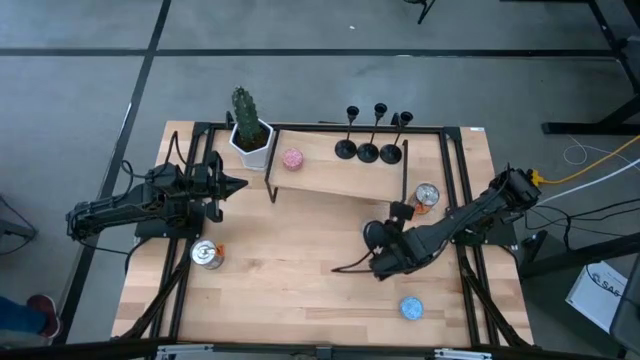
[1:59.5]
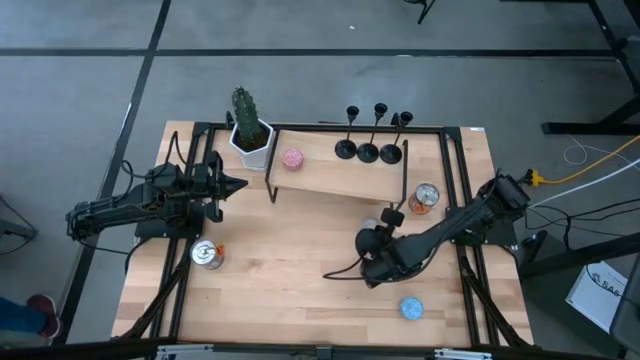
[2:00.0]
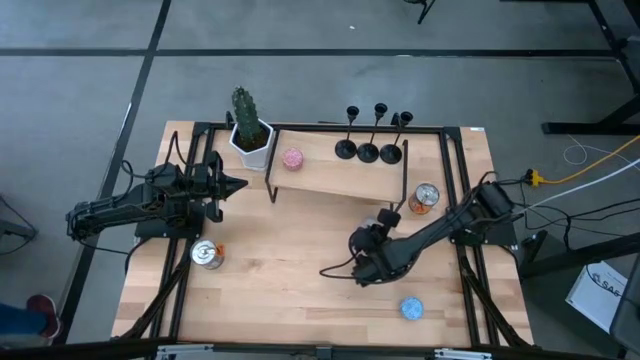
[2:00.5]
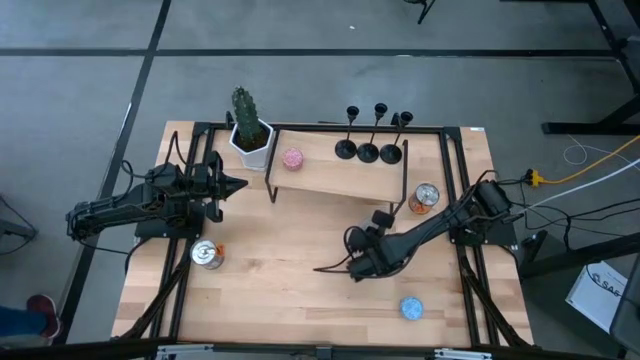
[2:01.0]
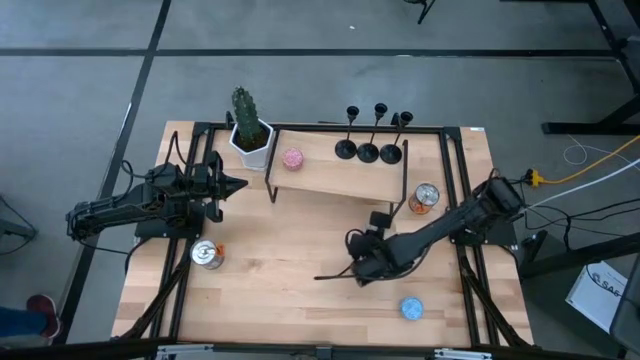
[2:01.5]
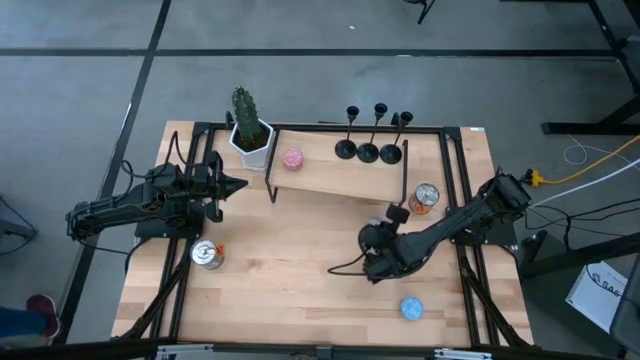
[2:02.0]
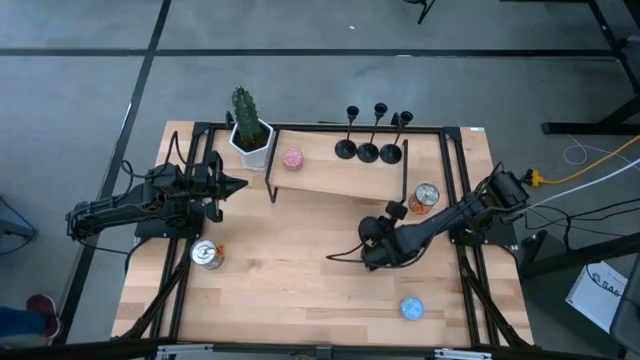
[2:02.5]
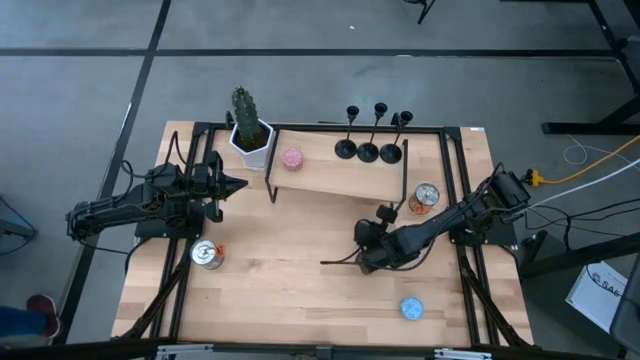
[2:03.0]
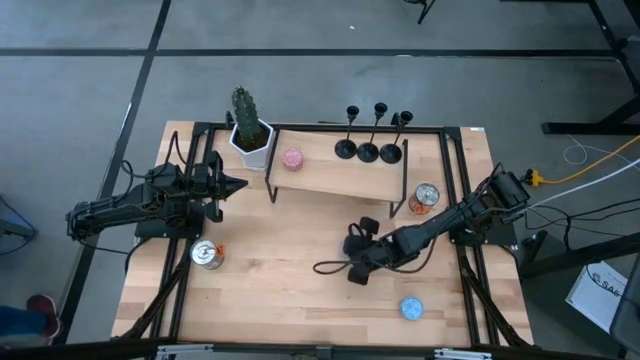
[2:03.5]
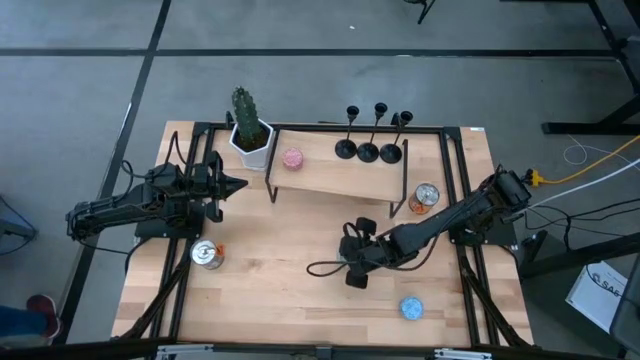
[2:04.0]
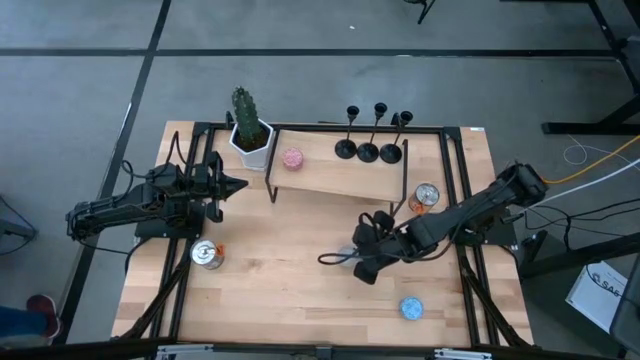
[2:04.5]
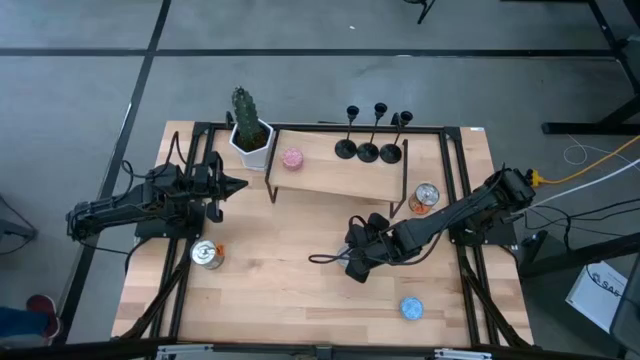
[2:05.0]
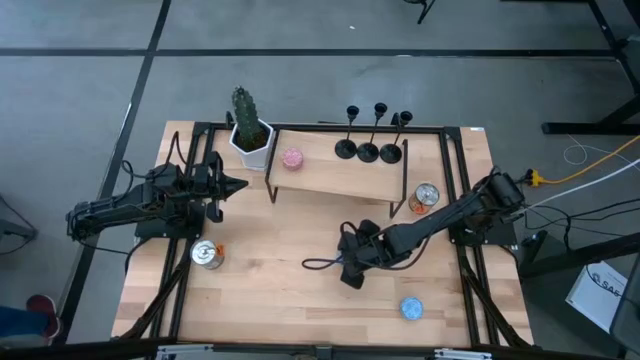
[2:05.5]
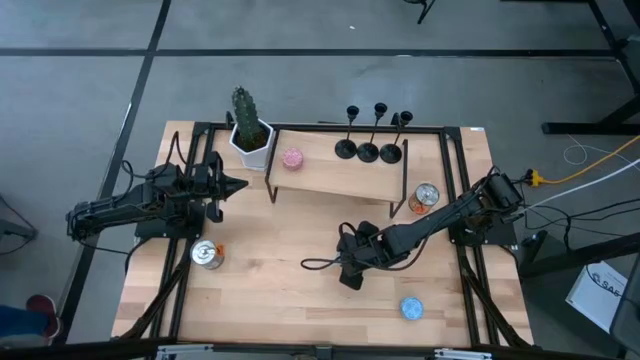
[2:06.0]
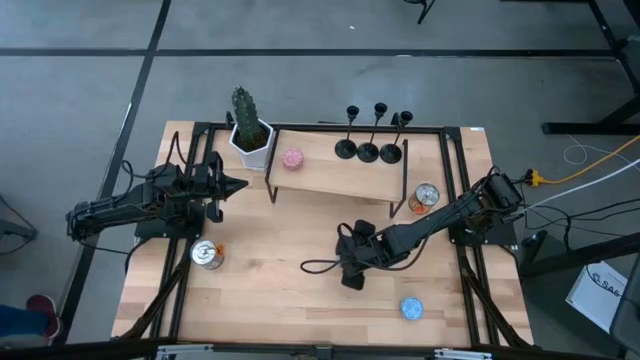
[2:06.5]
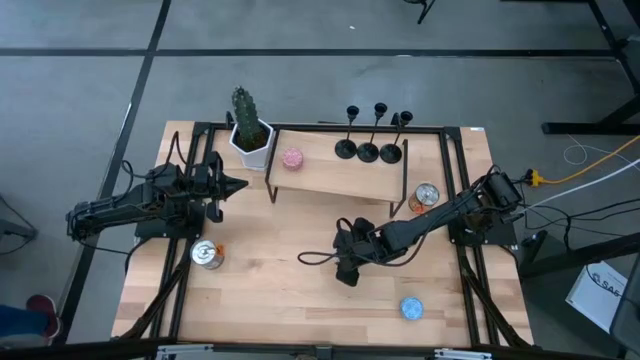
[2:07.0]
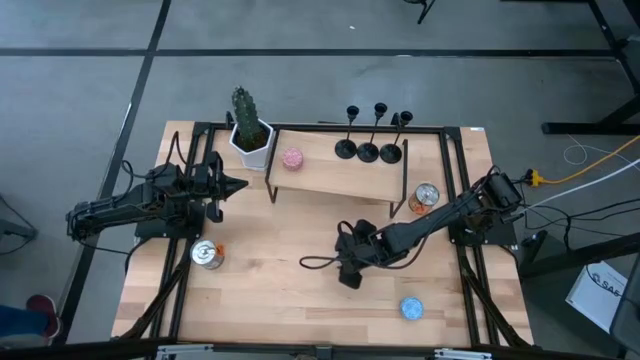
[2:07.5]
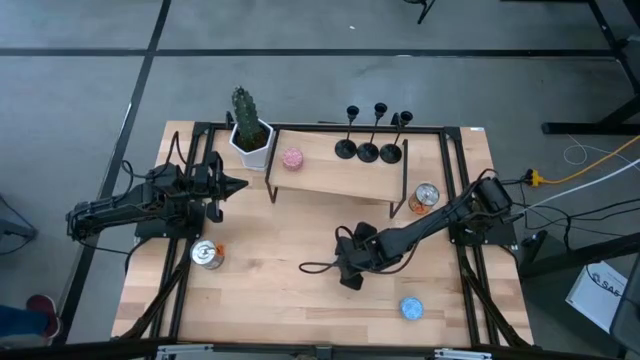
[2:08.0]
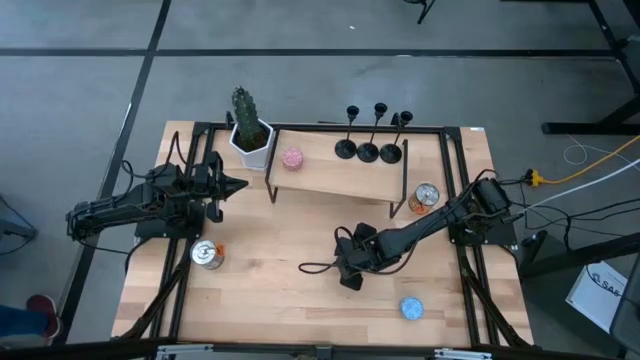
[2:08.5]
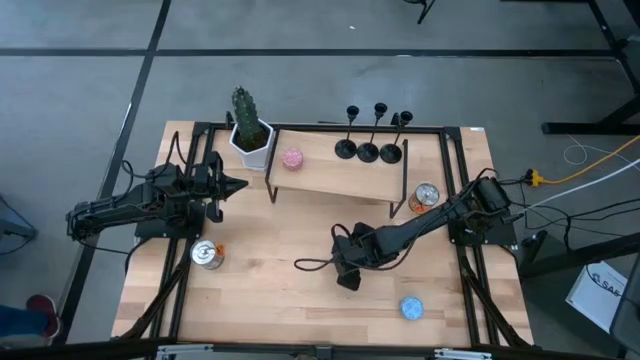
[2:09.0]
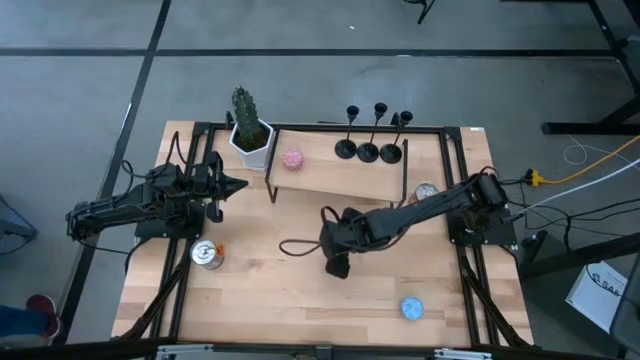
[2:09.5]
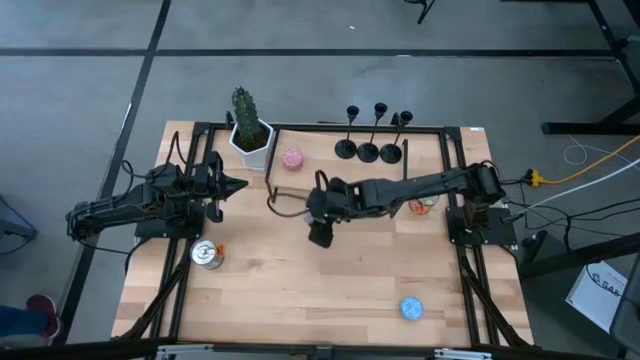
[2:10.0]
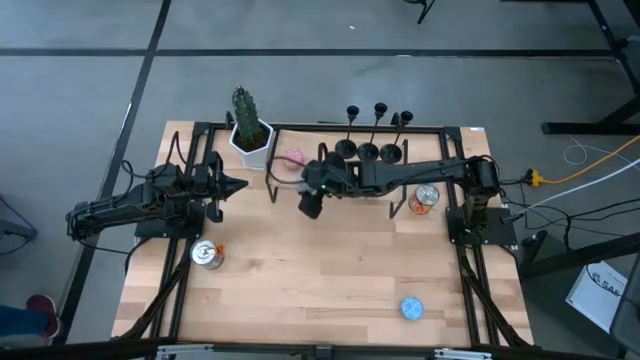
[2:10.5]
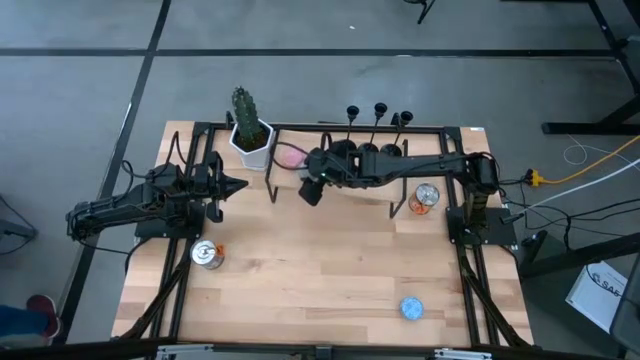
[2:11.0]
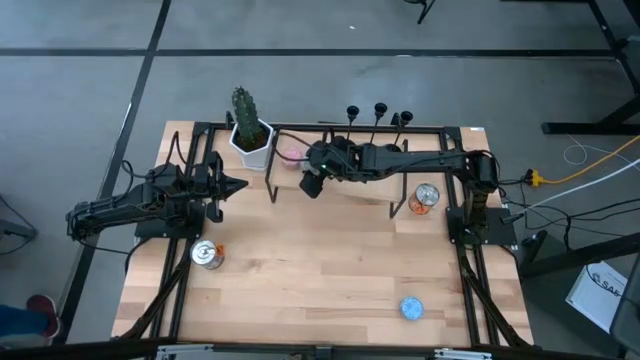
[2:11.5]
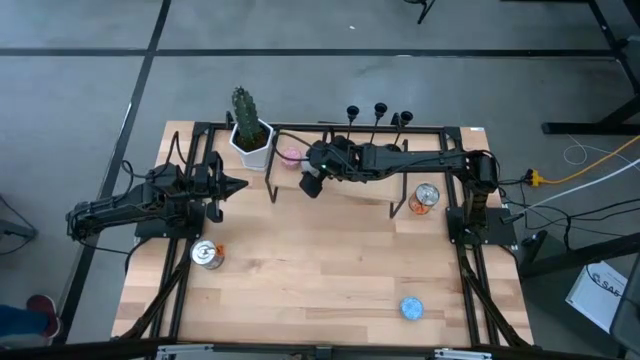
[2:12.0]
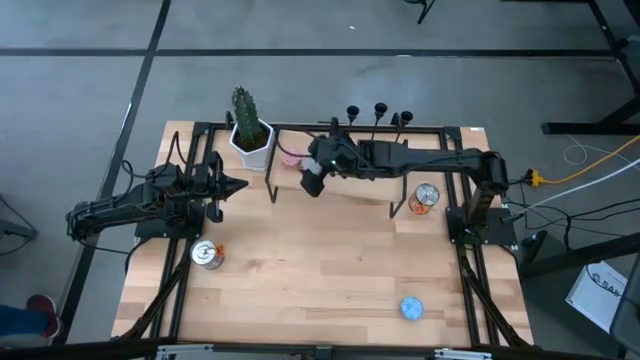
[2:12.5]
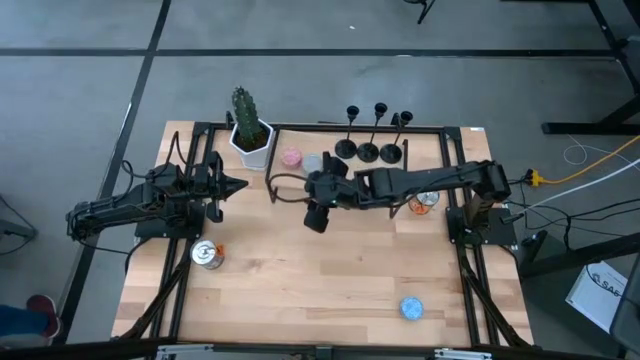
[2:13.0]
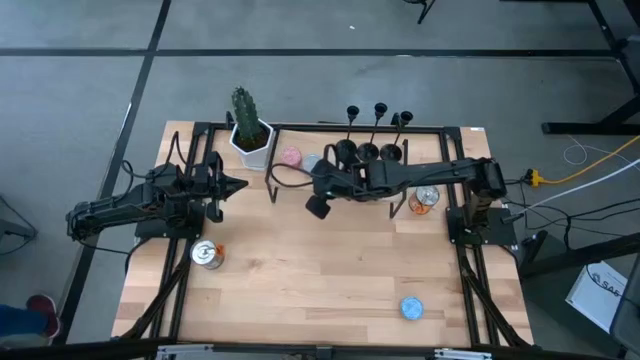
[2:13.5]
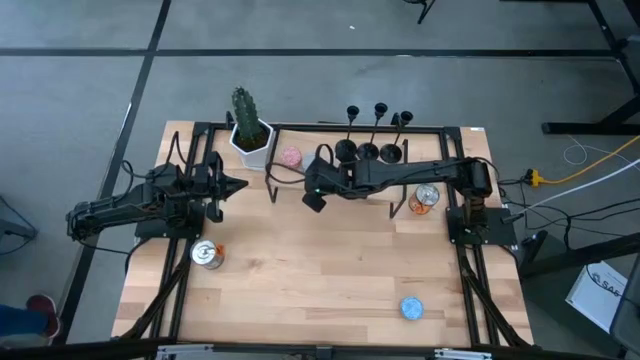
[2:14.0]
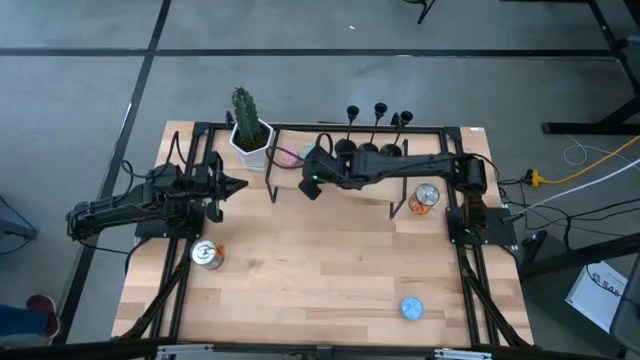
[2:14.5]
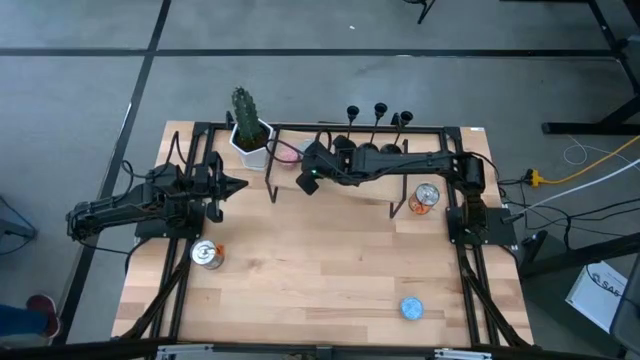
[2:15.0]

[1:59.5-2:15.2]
Task: Pick & Place candle stick holders
Put the blue scented candle on the shelf

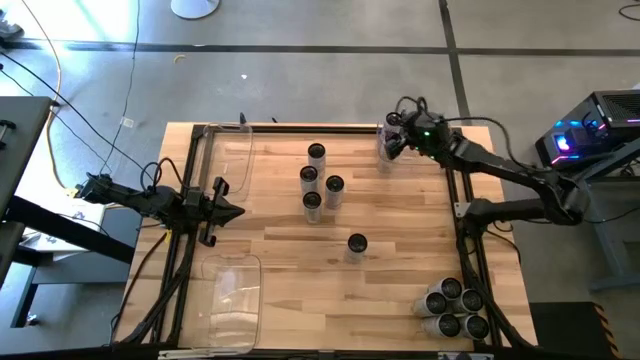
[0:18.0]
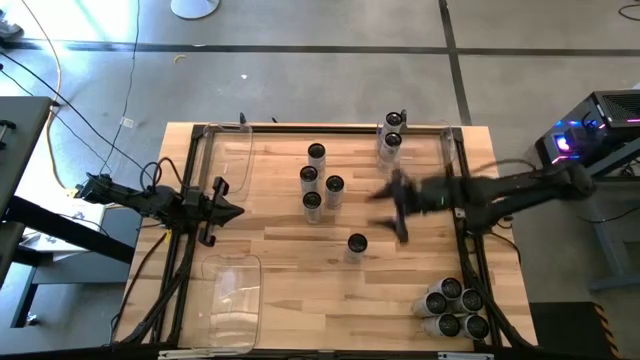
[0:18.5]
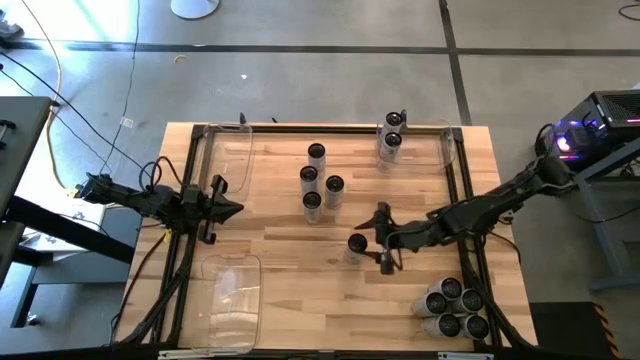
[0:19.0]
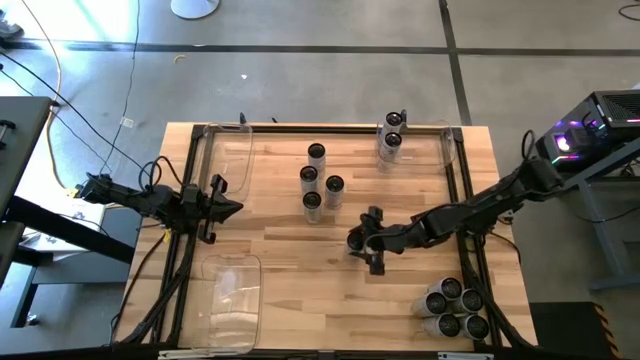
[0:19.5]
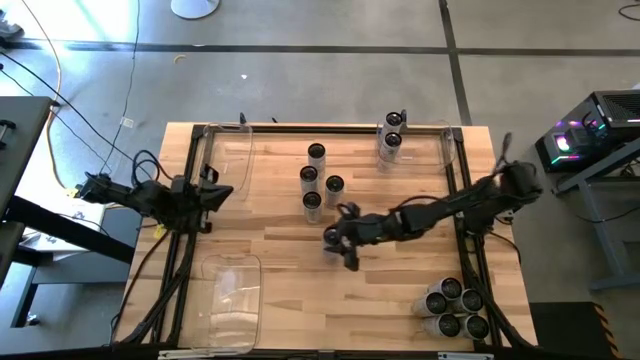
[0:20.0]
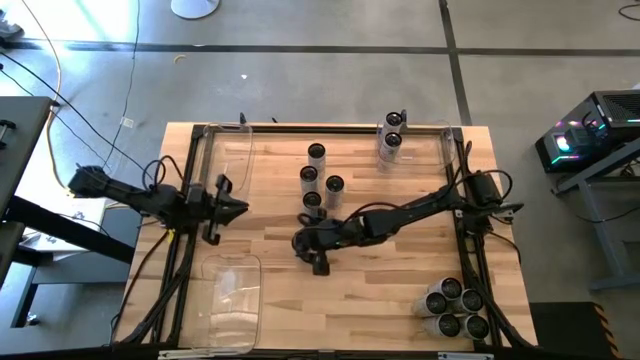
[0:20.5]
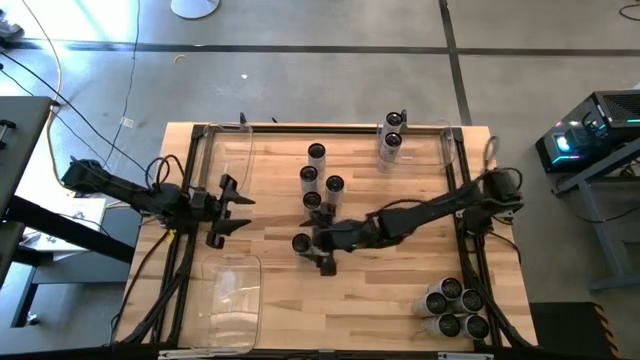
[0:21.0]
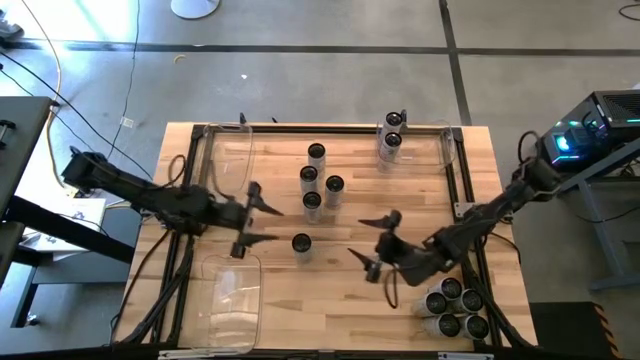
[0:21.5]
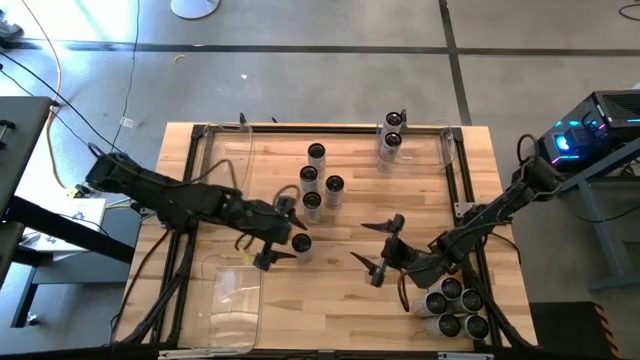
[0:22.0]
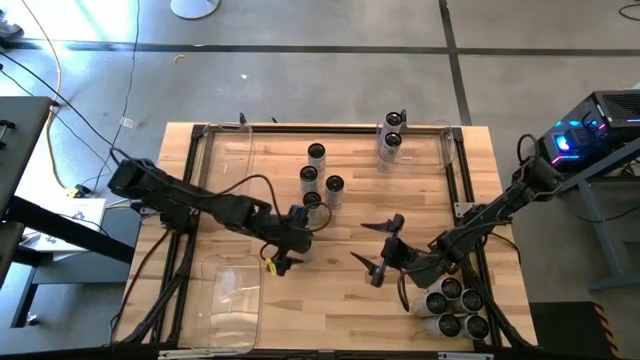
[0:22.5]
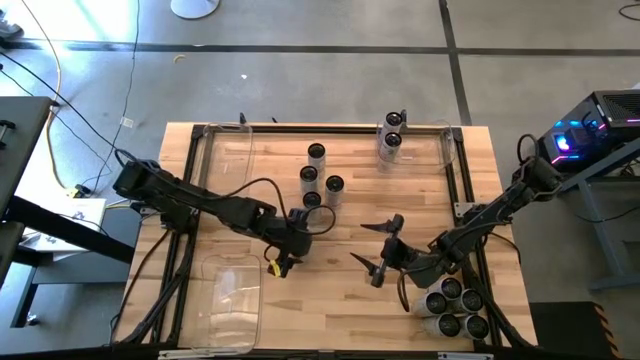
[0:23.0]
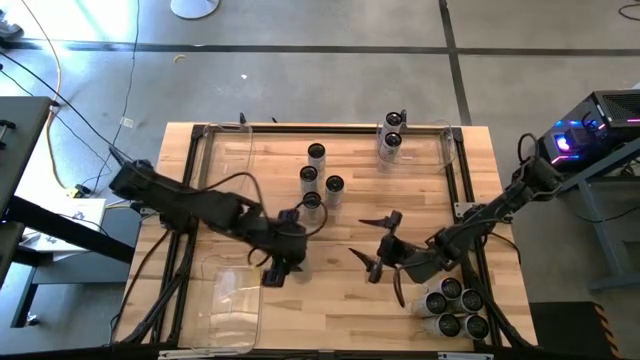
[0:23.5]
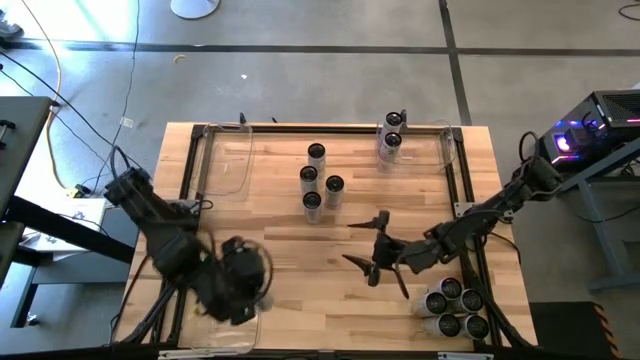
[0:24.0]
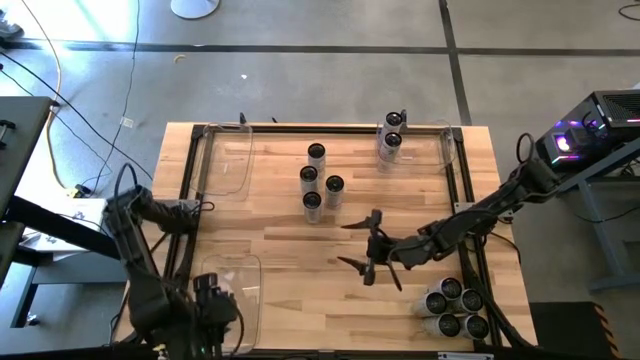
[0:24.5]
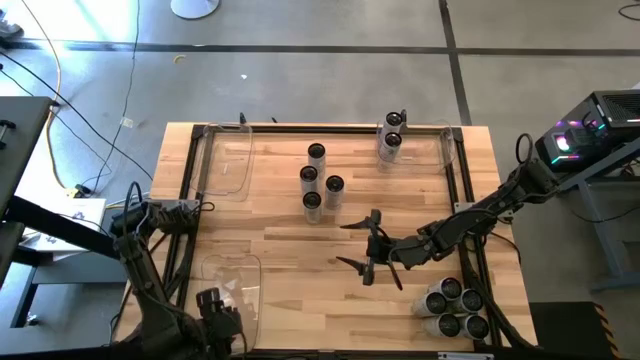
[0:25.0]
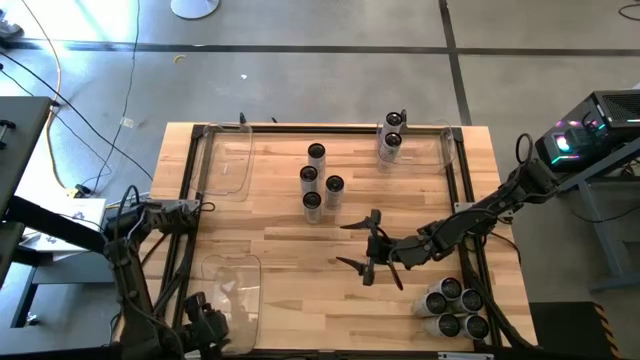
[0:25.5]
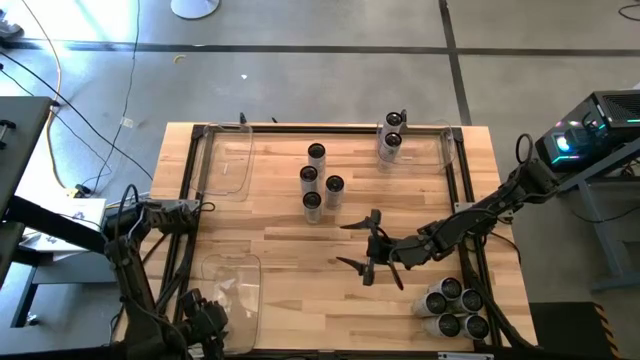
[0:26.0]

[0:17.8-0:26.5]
Task: Sort soda cans
Put the white blue soda can into the bottom transparent bin
